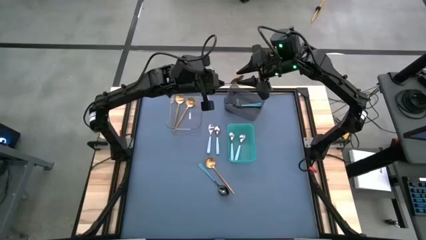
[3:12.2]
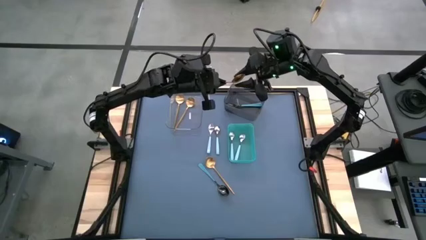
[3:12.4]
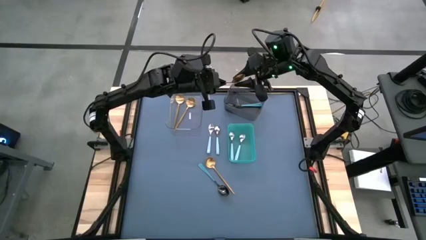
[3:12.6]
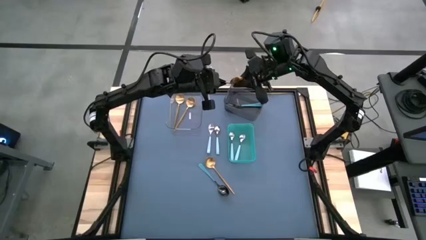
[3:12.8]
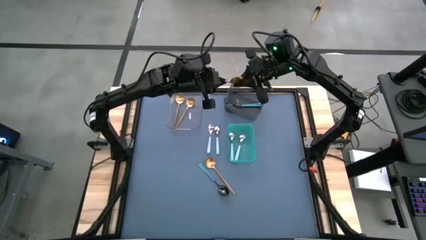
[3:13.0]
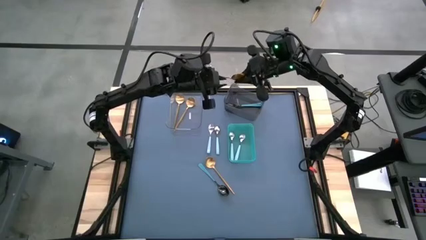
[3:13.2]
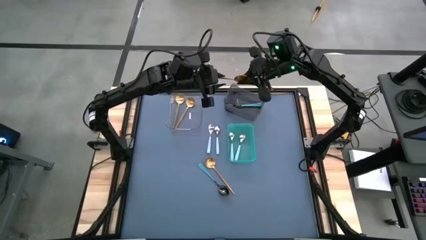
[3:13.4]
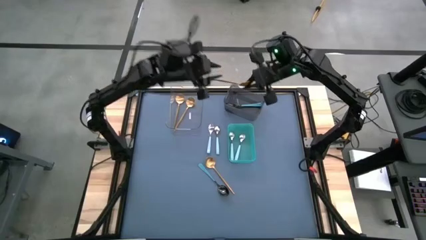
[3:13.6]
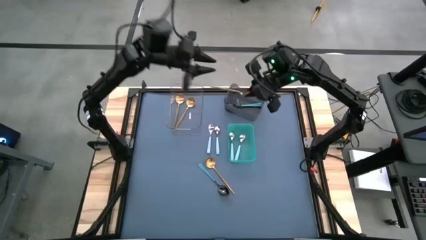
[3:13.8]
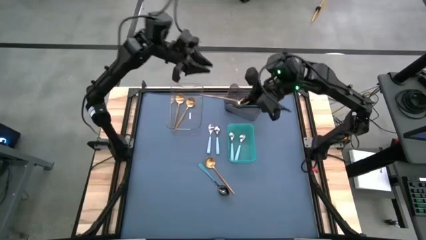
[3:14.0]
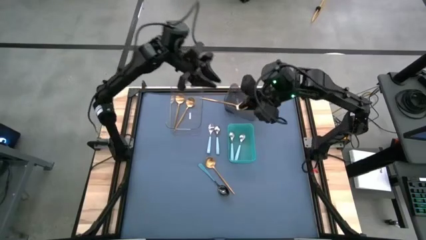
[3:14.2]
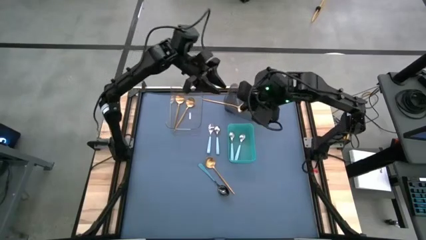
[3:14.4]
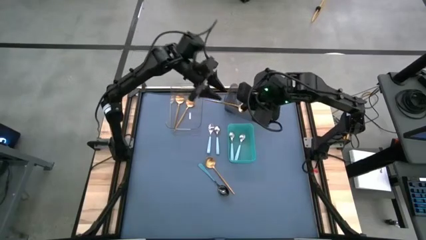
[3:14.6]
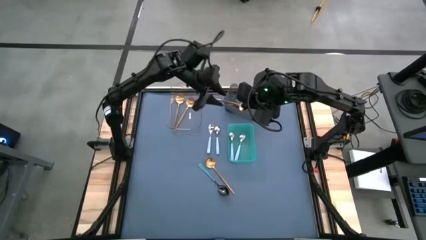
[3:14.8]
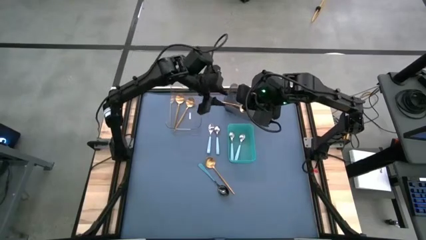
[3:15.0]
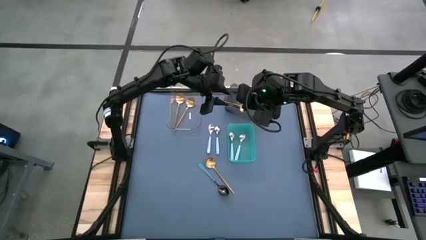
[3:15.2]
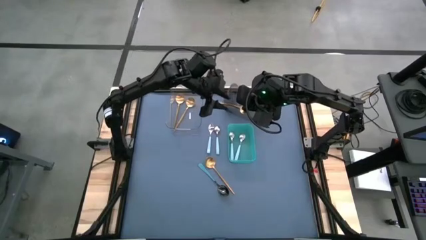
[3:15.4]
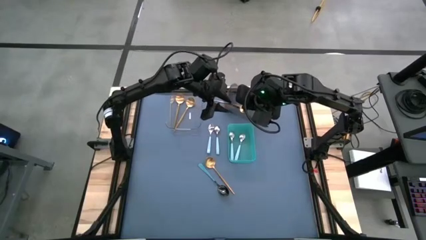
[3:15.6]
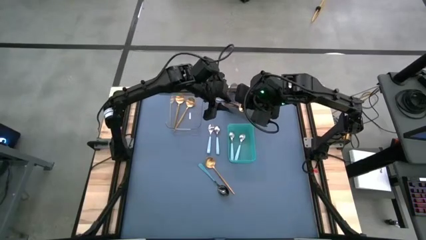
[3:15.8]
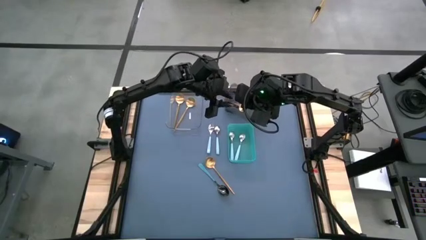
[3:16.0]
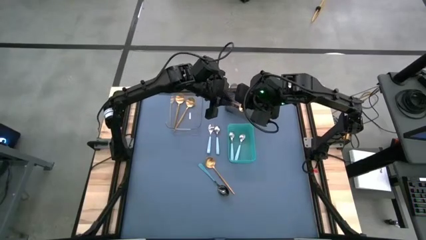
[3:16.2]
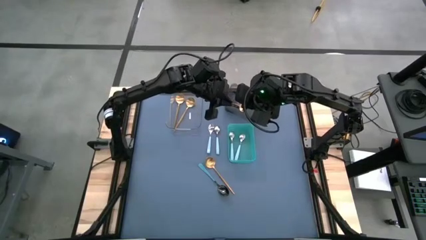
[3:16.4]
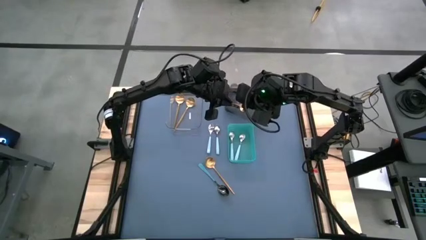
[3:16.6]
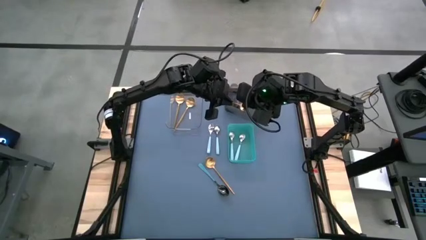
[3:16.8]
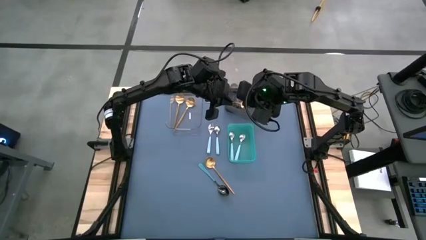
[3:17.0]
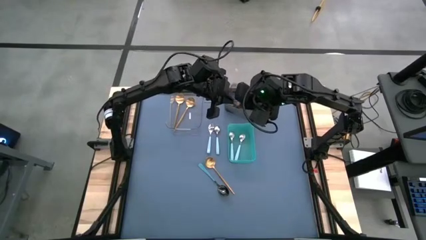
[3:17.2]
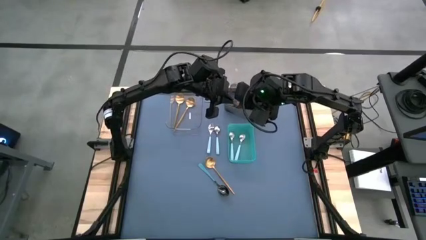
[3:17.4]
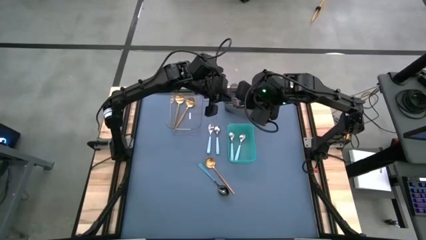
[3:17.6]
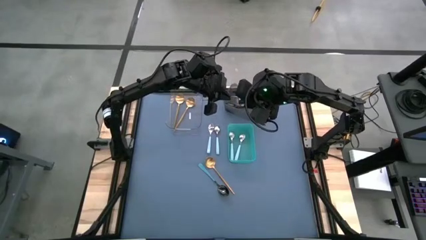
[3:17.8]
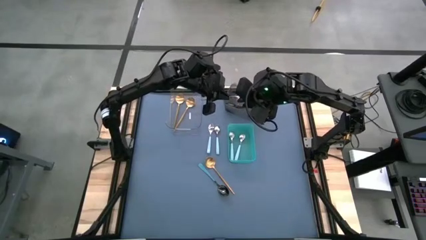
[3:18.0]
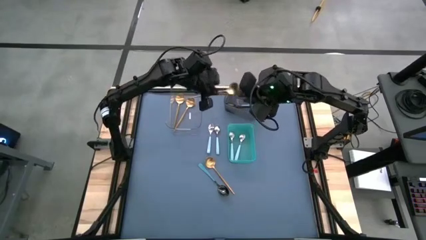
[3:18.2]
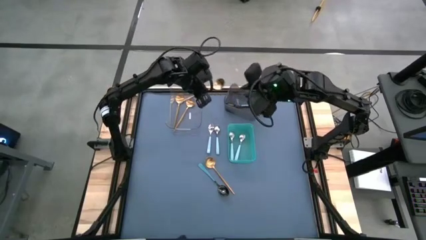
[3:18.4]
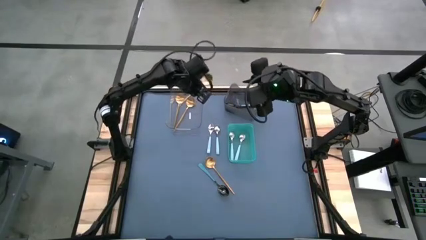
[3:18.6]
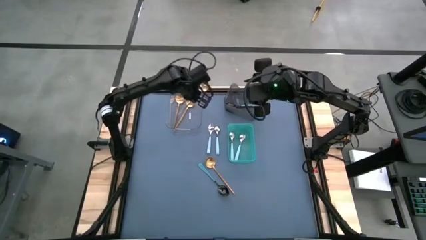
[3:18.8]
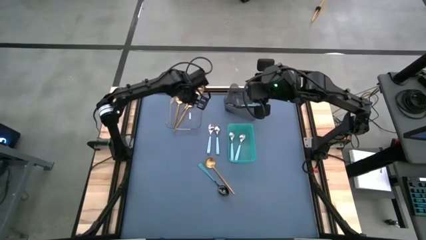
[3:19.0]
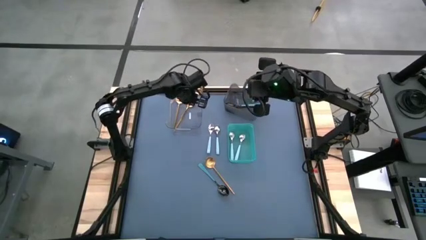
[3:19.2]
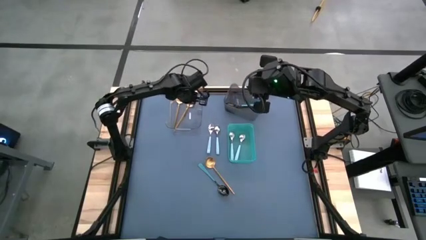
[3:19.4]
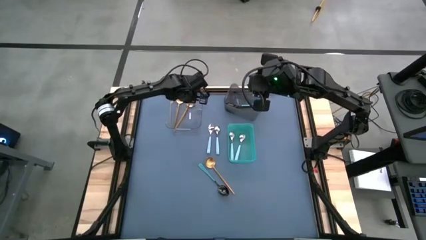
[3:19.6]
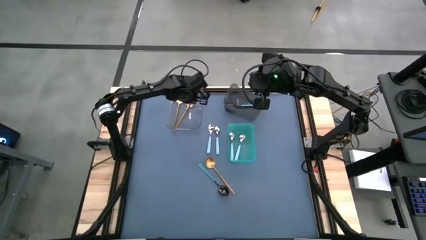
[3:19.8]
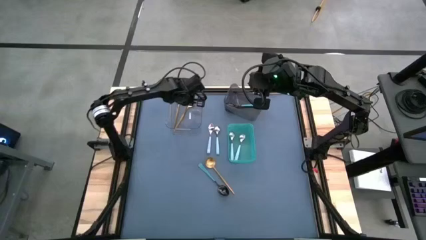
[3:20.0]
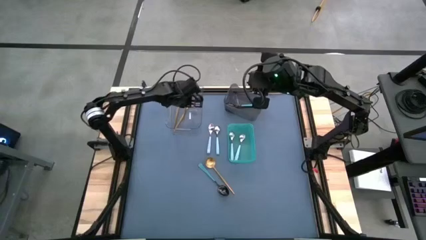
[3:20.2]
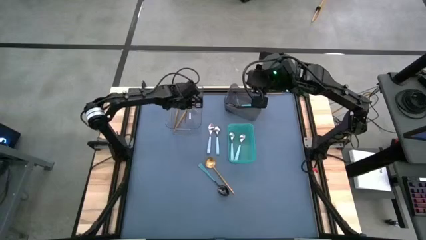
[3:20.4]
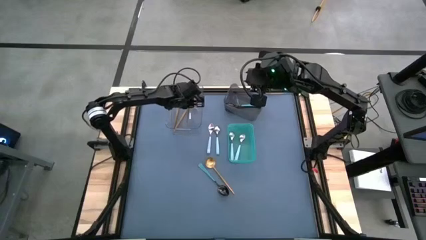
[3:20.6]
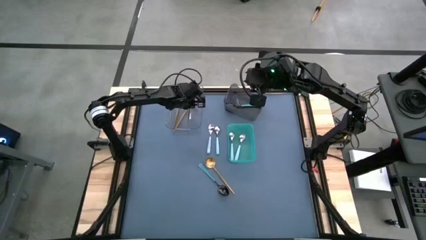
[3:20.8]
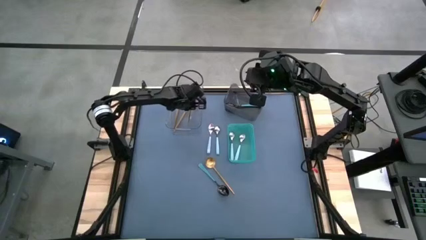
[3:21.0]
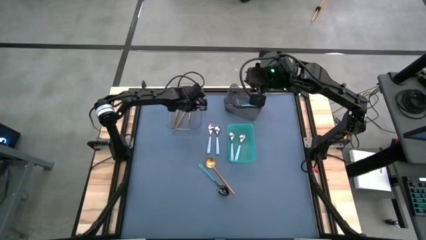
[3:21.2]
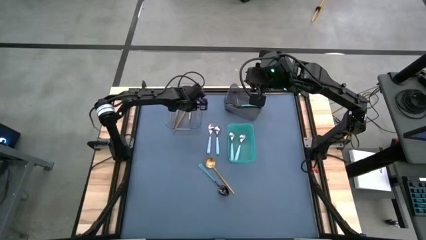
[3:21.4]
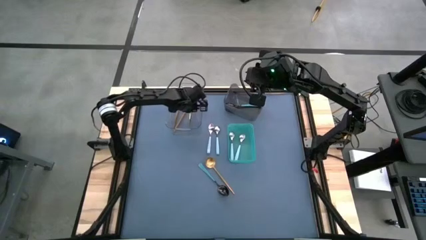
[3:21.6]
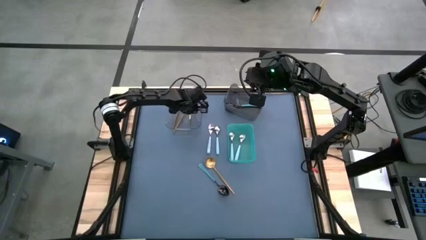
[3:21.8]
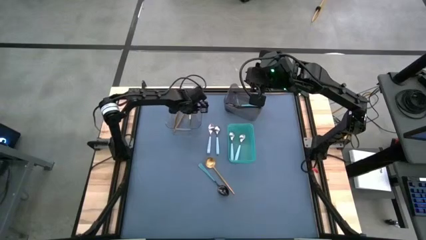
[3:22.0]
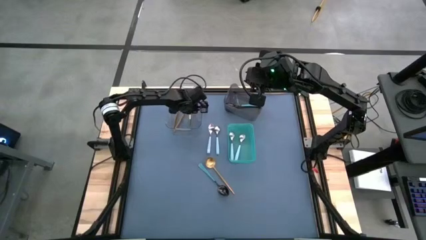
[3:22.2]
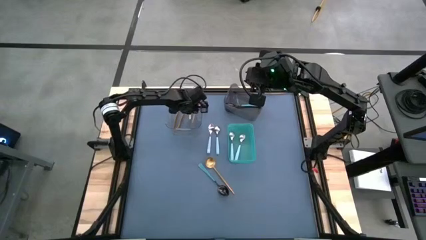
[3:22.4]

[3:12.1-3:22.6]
Task: Sort silverware by color (type)
Adjust the gold spoon in the transparent bin
